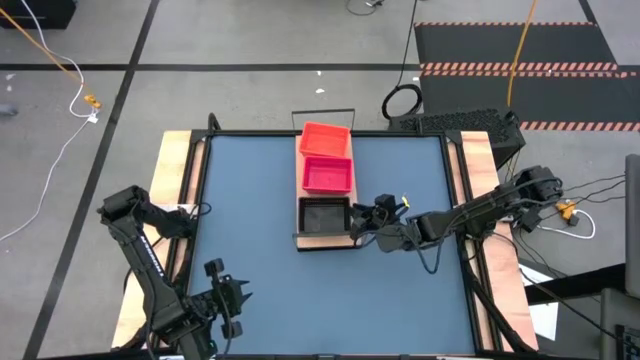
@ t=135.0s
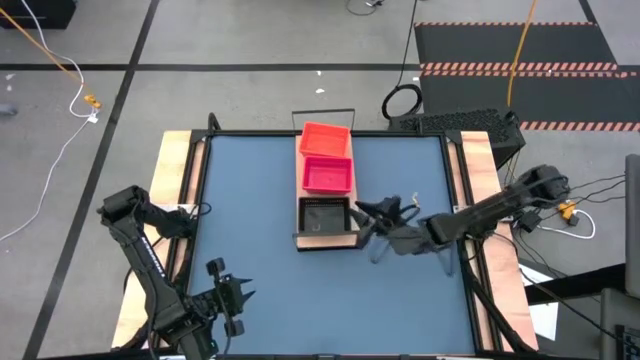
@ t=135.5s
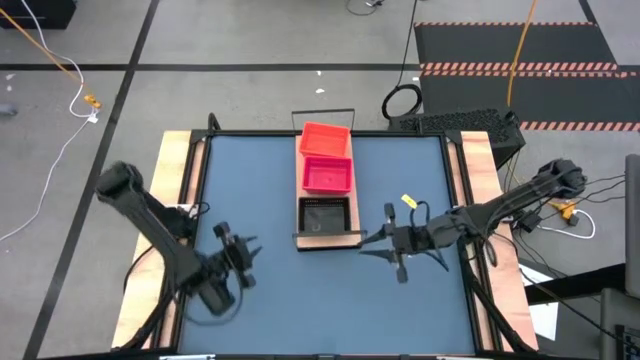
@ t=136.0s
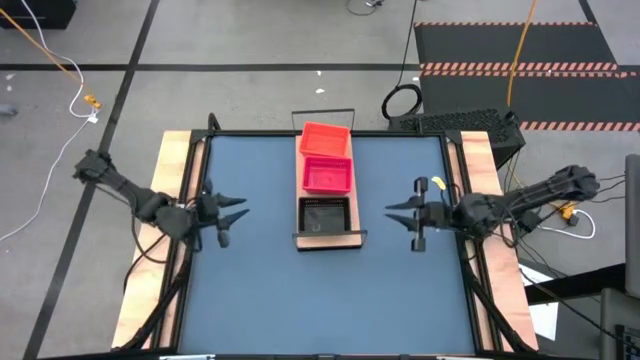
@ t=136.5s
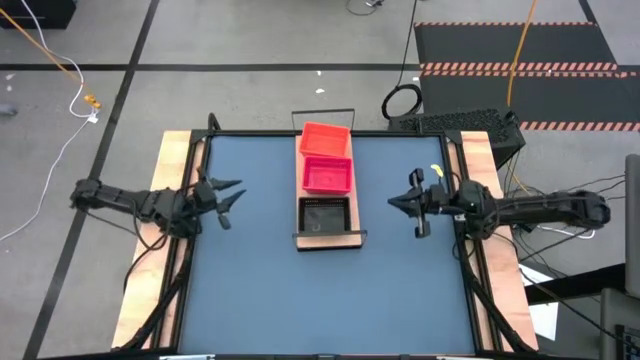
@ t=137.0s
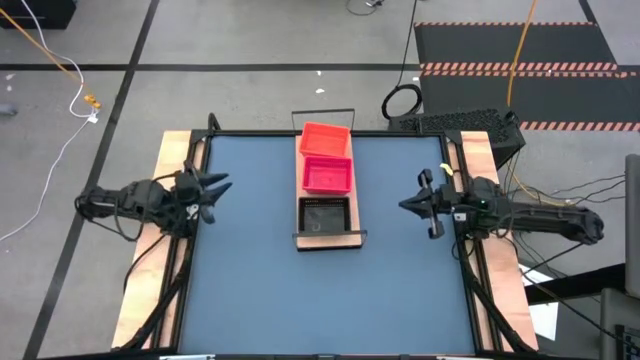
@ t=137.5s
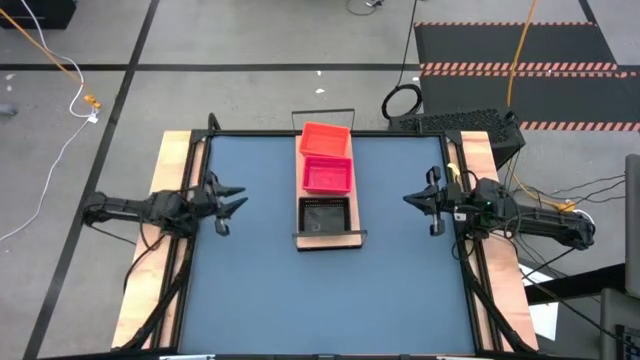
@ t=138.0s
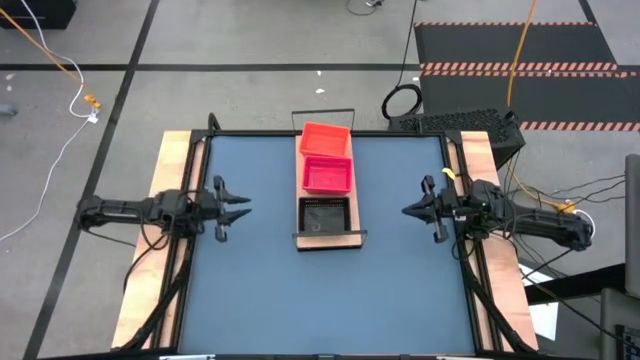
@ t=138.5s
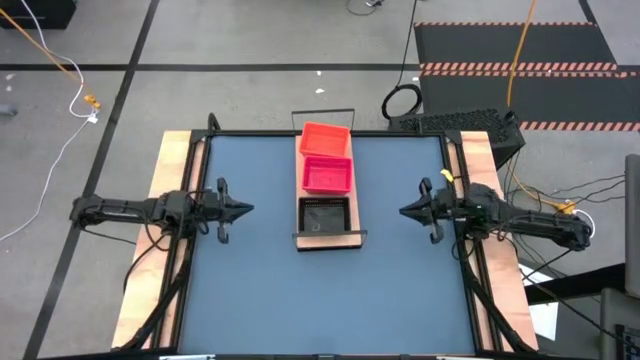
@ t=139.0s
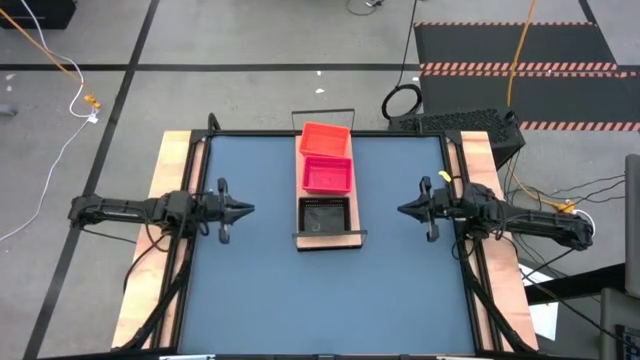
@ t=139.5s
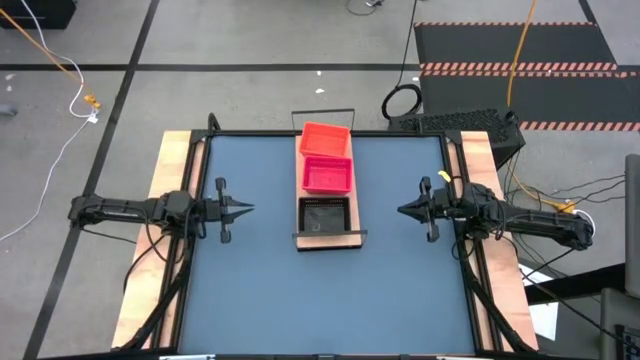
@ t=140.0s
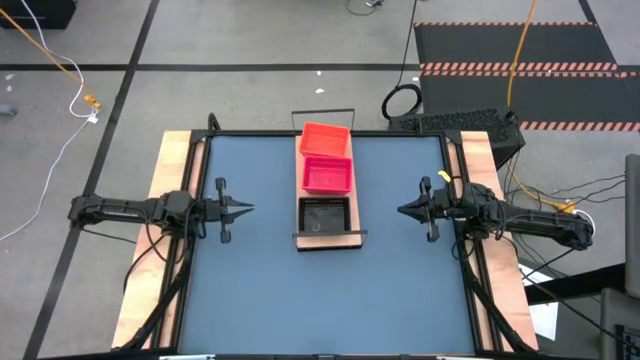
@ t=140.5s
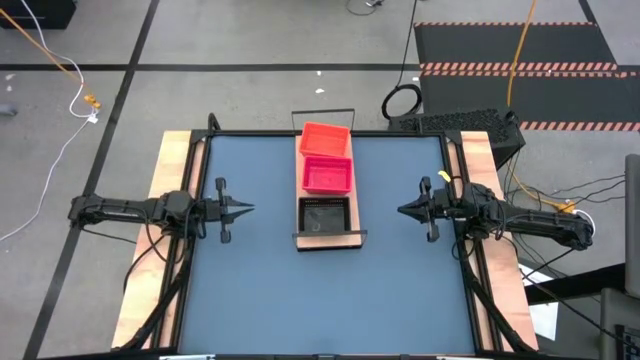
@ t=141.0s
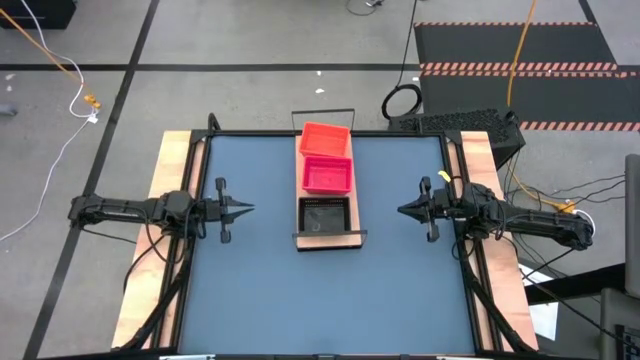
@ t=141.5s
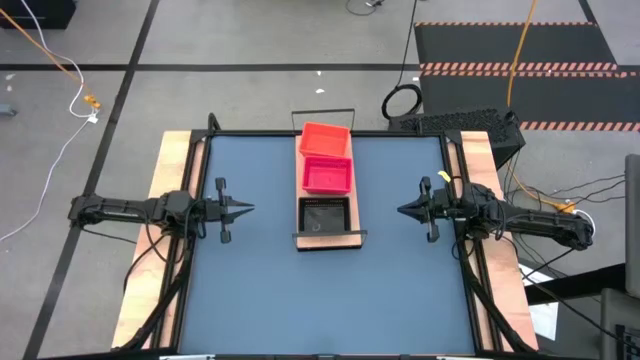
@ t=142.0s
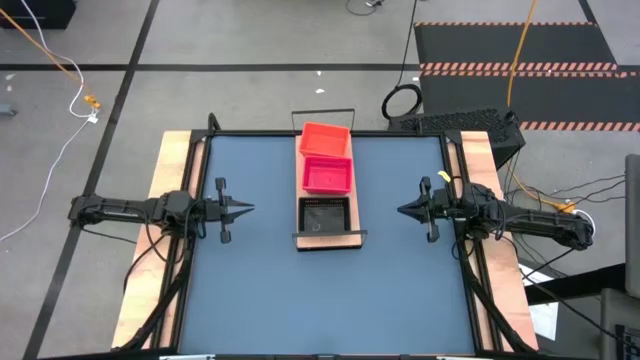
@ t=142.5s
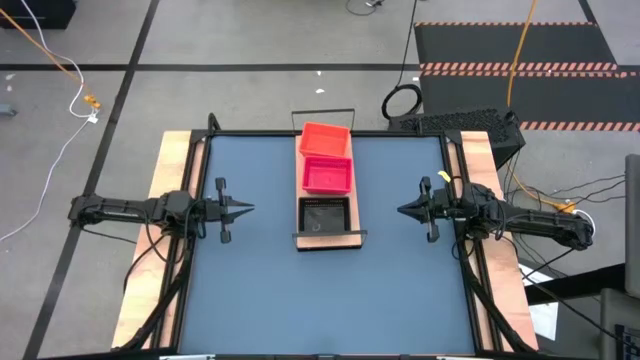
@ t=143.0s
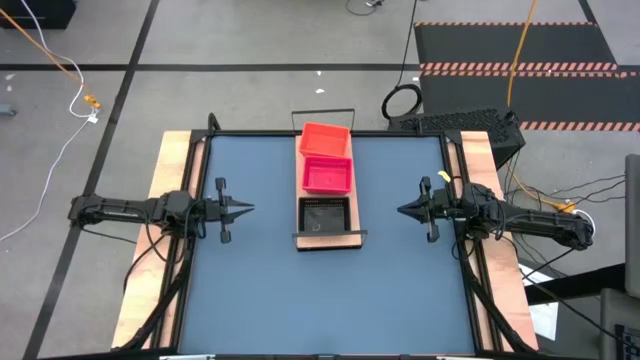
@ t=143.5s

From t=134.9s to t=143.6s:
Task: Stack baskets on shelf by color
Return to Home Position

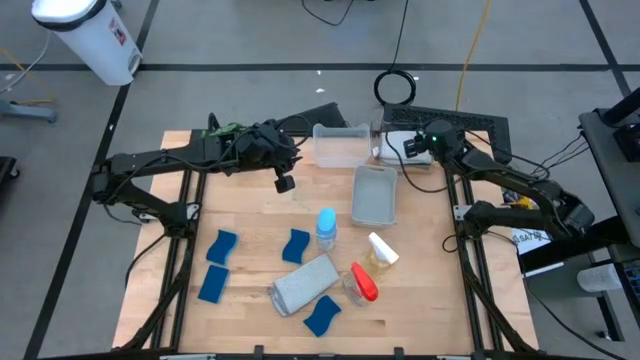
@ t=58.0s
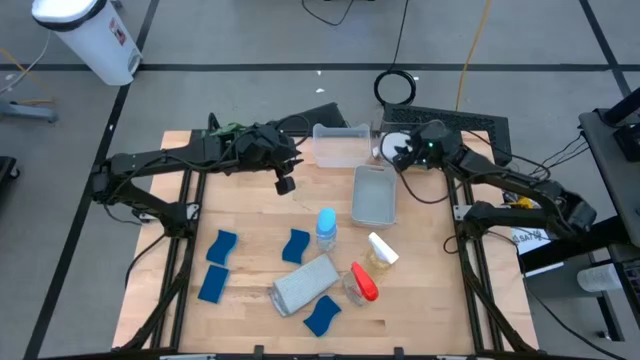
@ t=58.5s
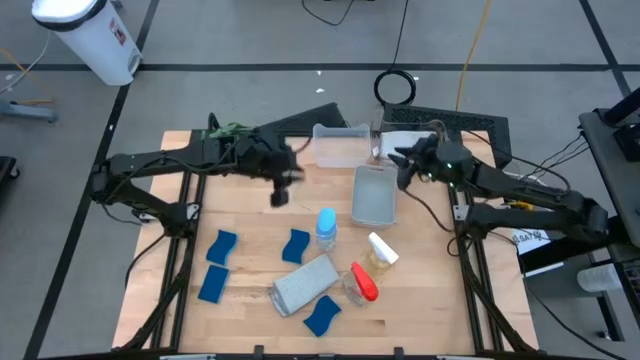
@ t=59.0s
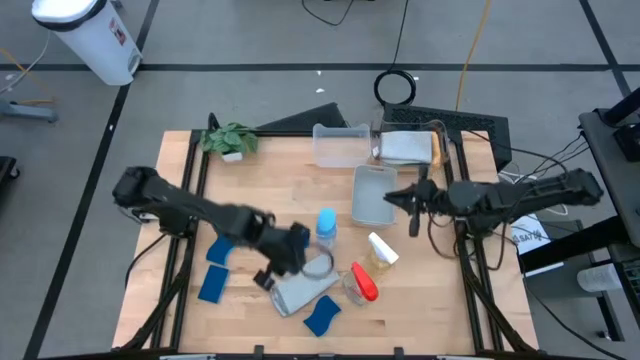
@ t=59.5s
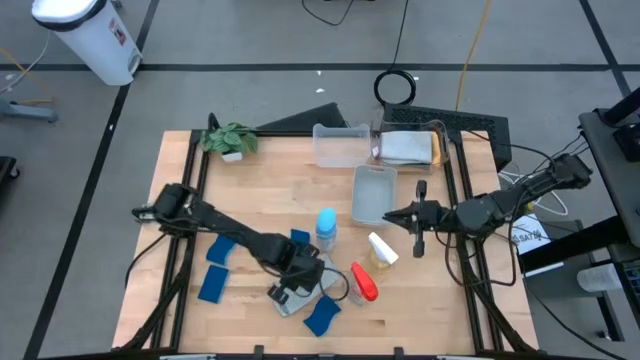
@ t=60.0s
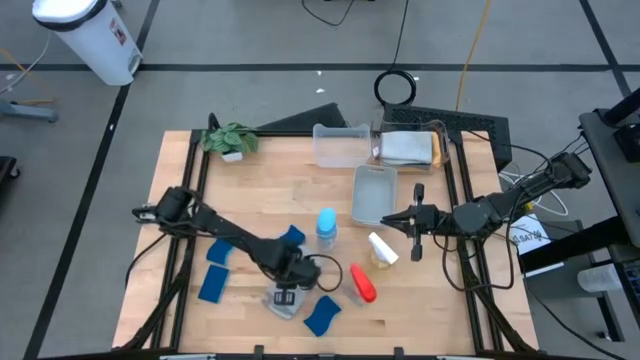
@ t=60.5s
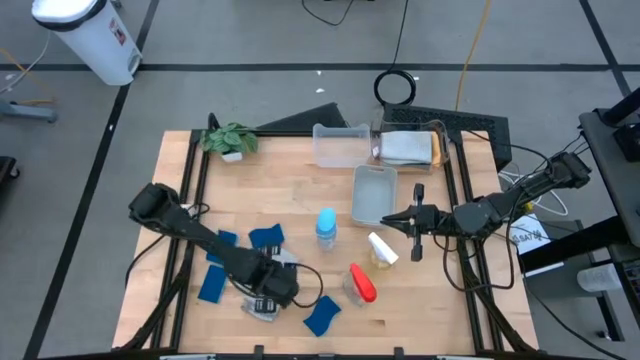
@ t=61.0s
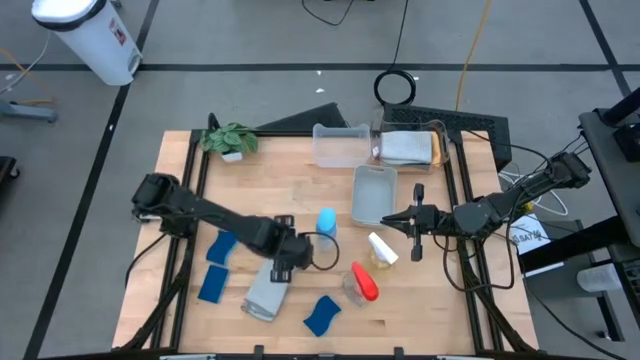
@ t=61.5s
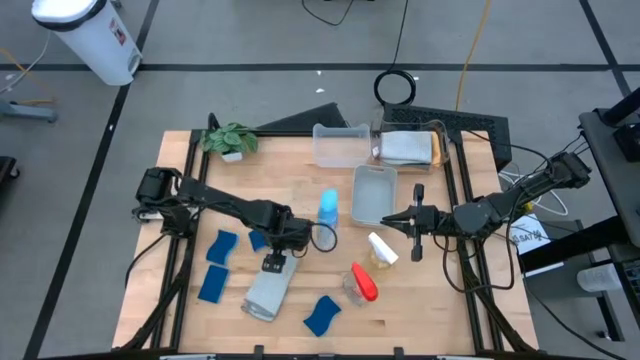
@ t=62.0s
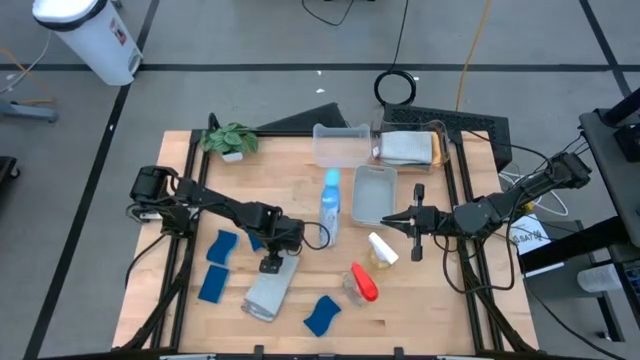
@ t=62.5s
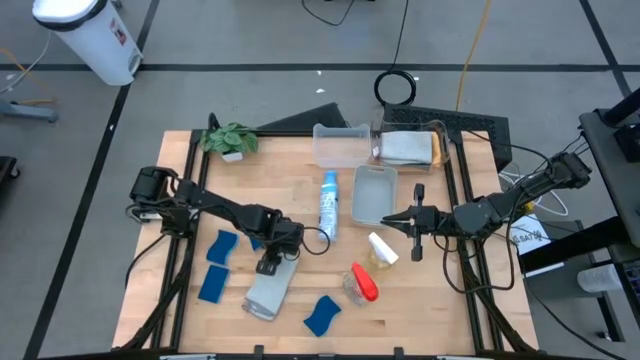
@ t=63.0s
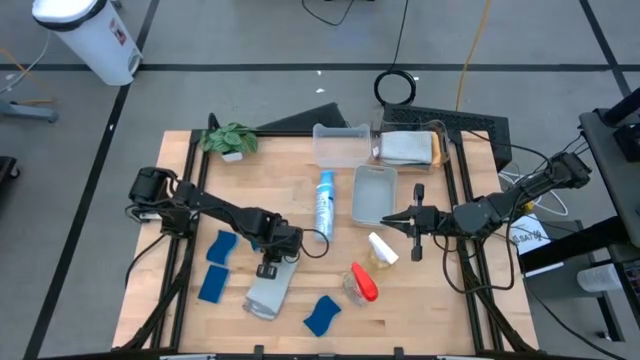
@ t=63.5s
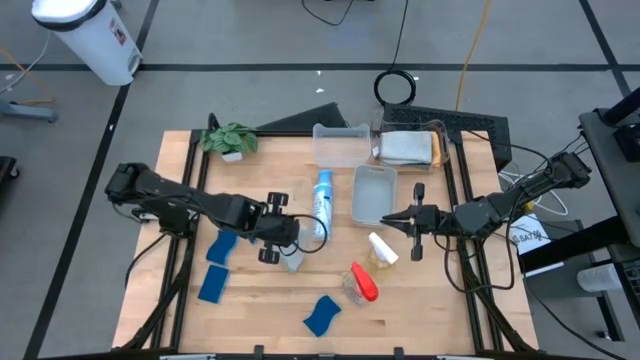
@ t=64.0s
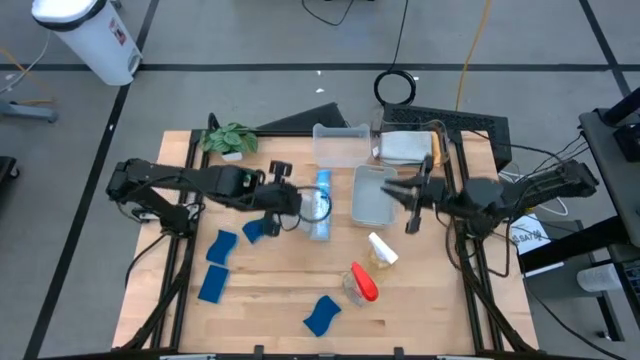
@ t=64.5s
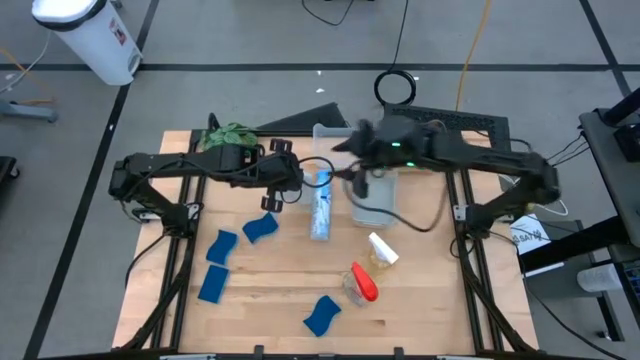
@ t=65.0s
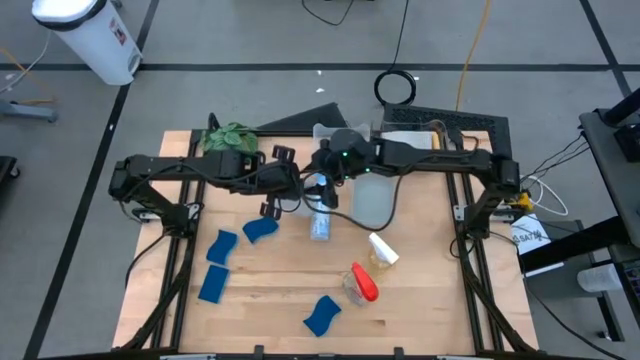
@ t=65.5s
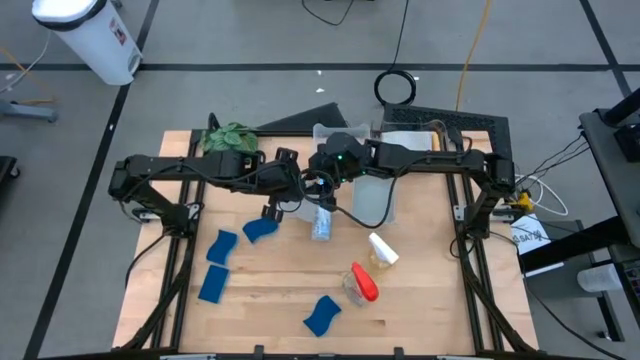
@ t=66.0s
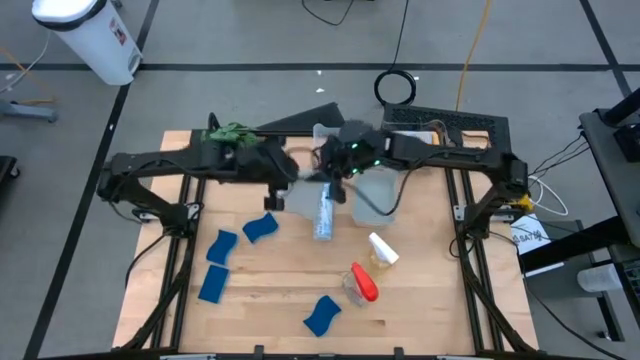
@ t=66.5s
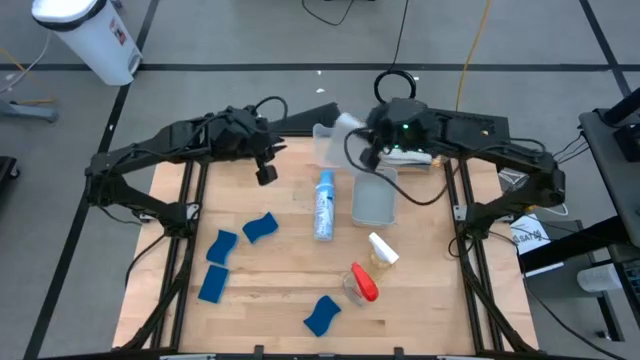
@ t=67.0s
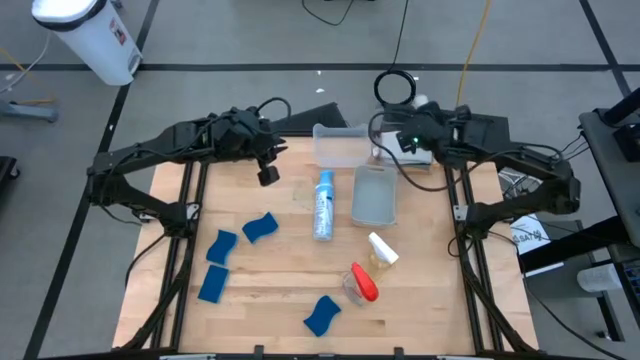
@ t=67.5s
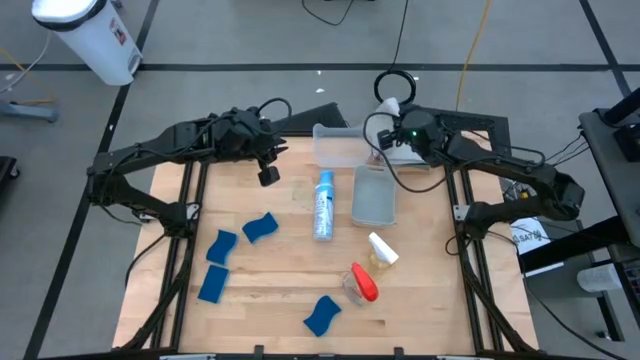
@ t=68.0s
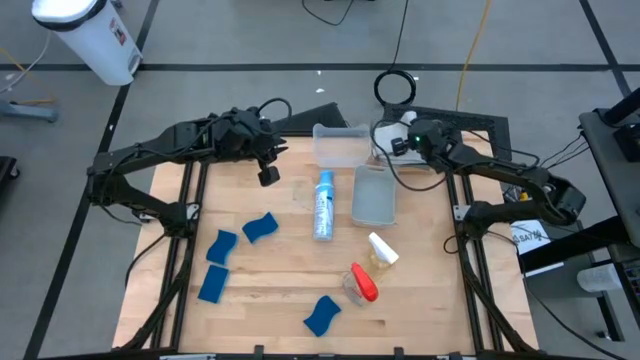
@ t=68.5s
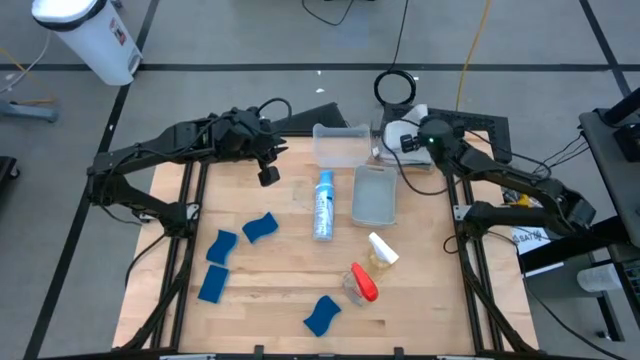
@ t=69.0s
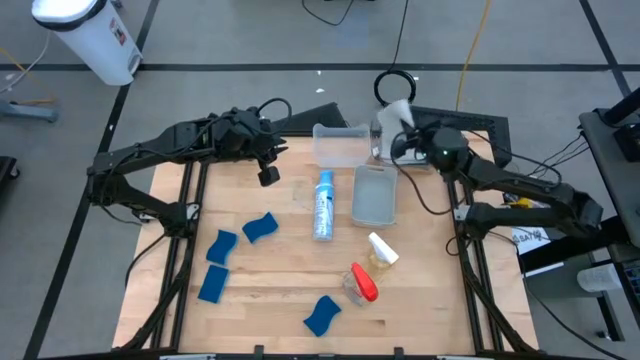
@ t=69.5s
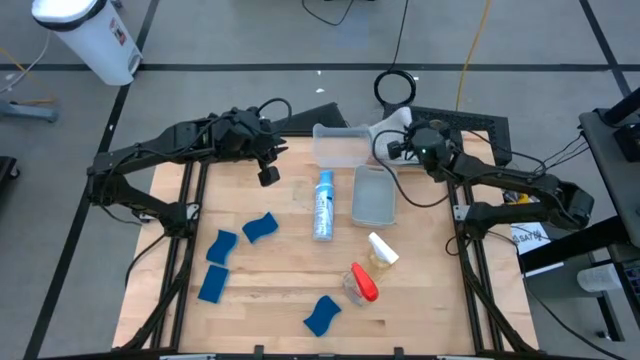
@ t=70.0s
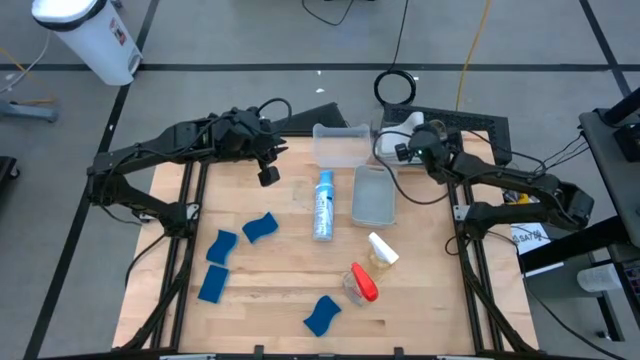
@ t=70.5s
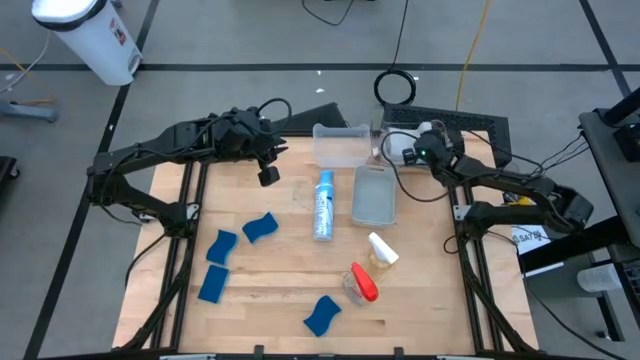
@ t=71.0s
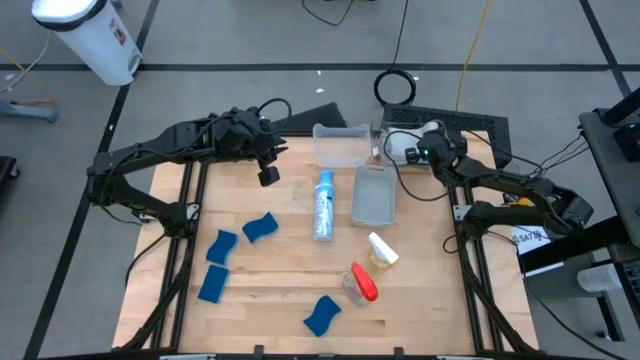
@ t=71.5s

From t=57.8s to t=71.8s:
Task: Pick & Place Kitchen Items
Put the gray towel into the transparent bin
